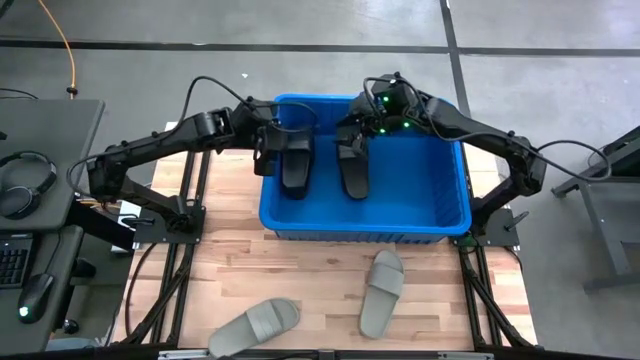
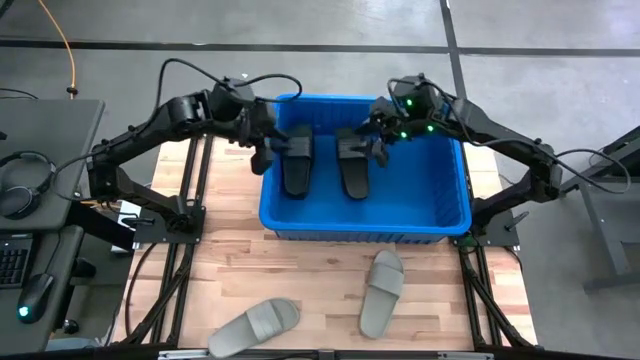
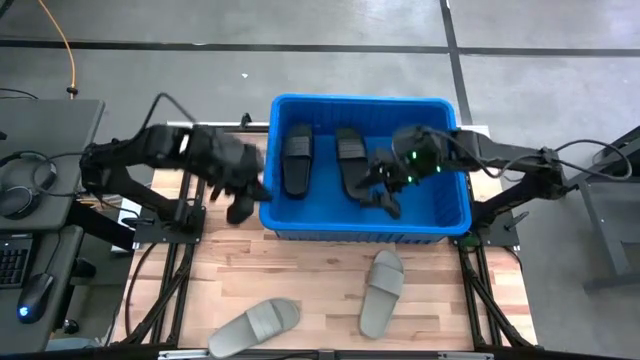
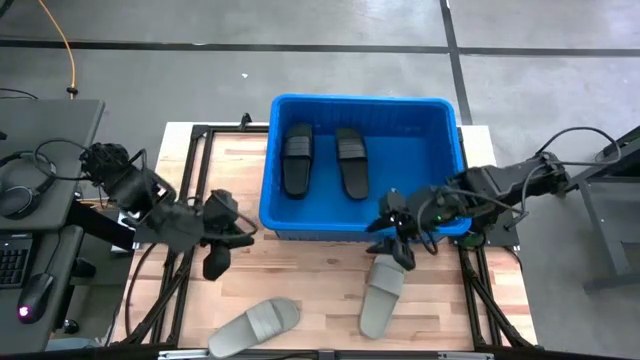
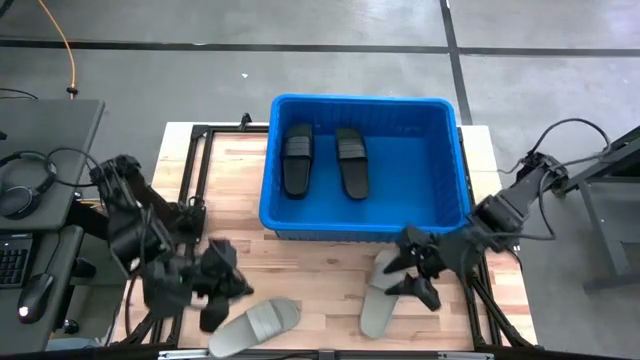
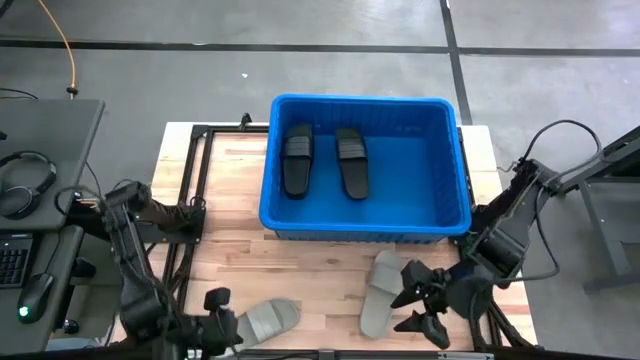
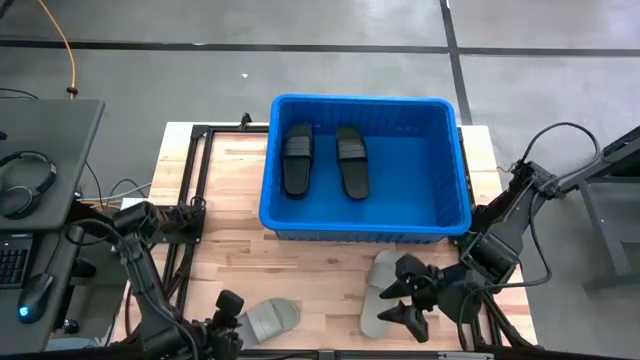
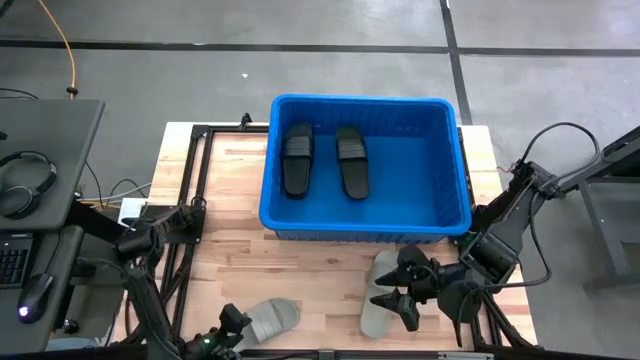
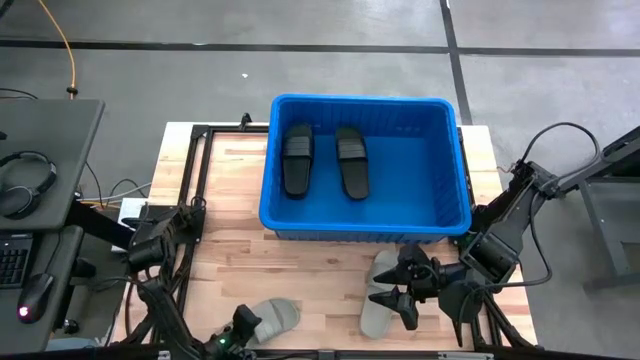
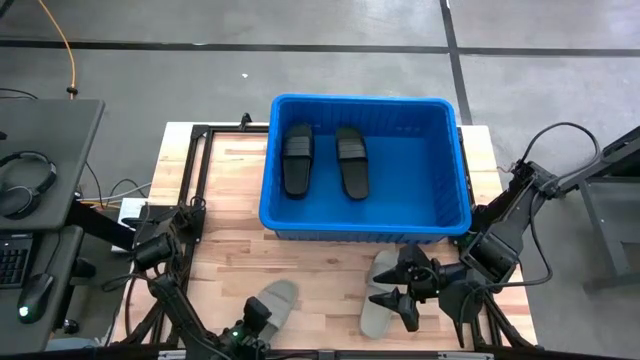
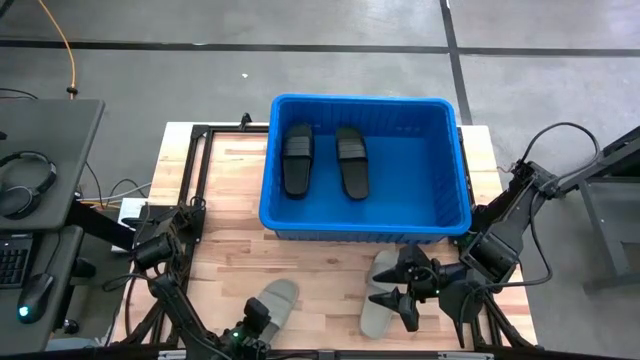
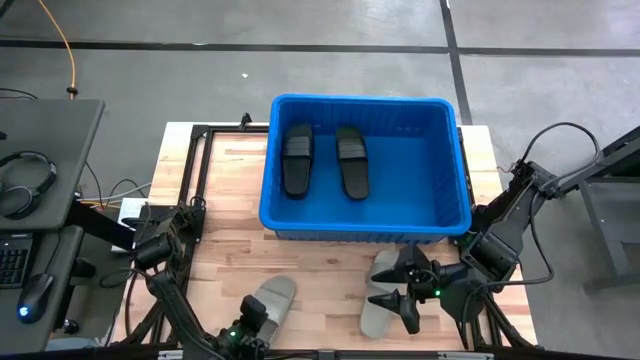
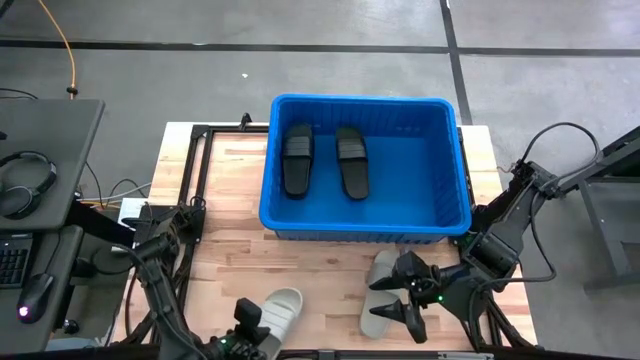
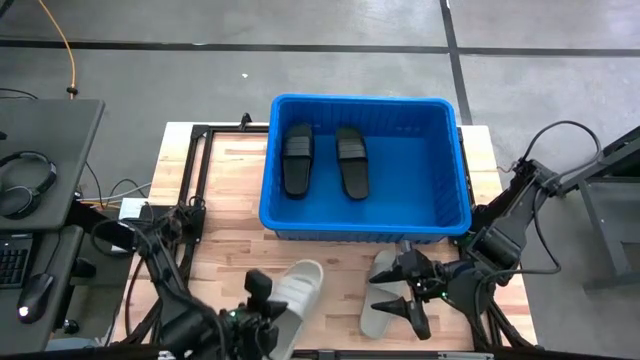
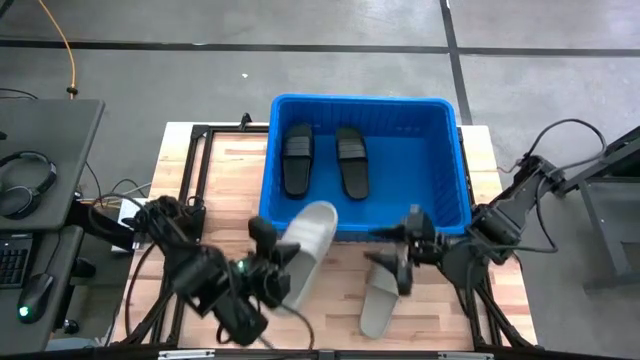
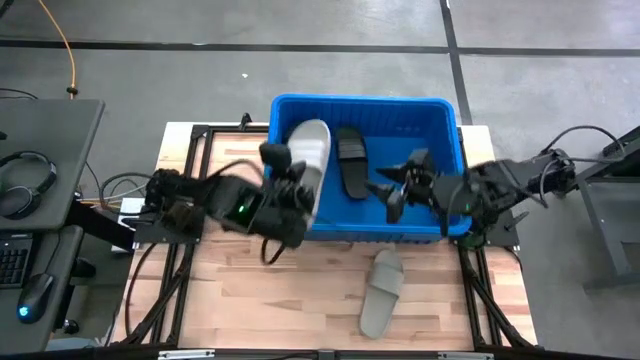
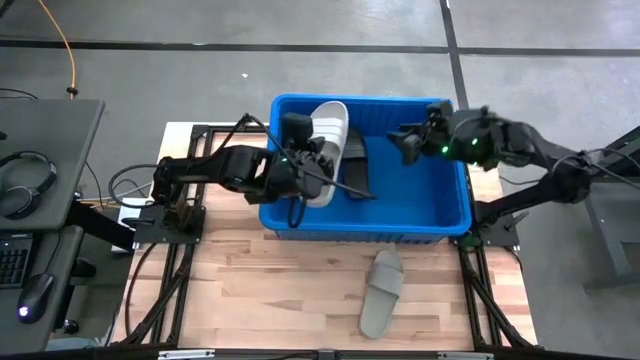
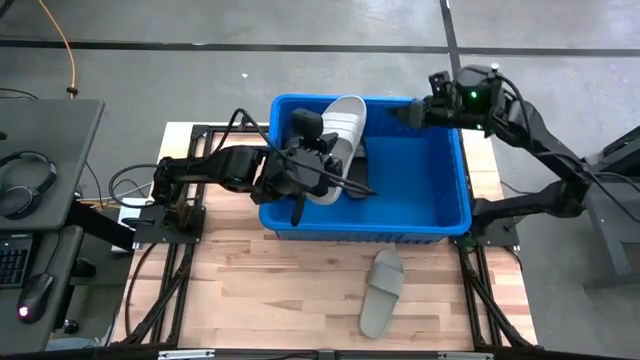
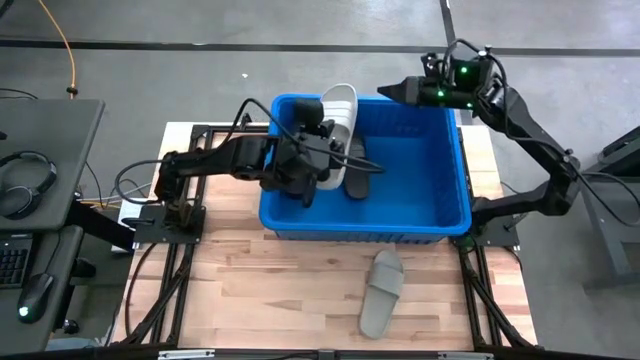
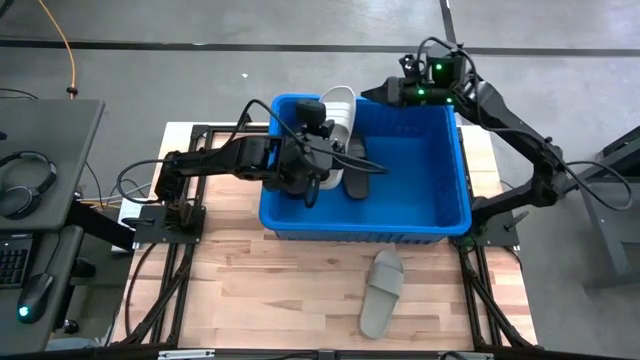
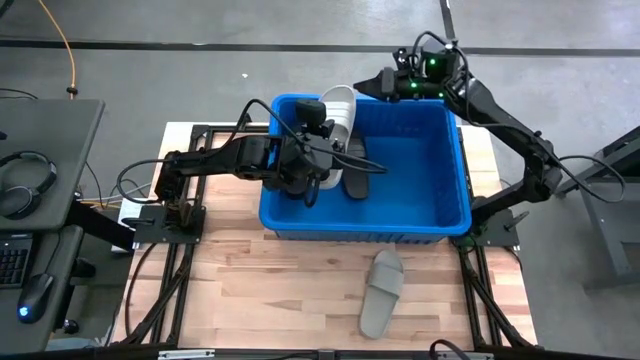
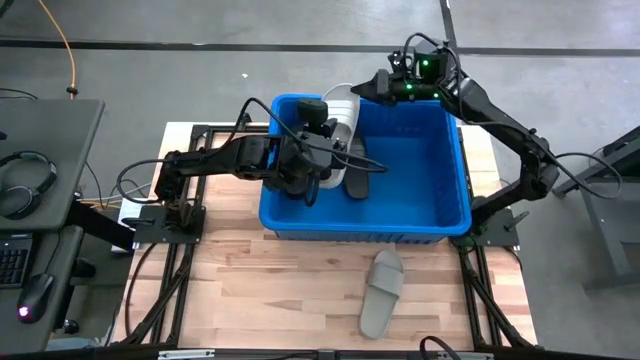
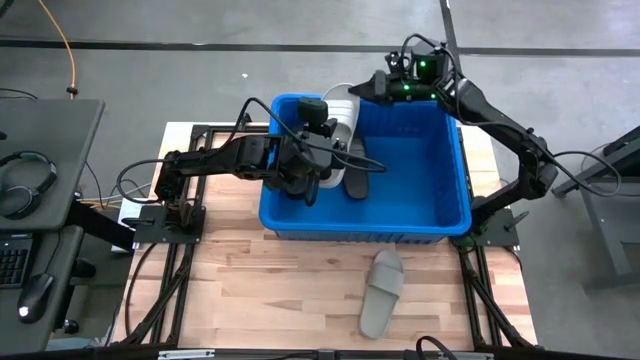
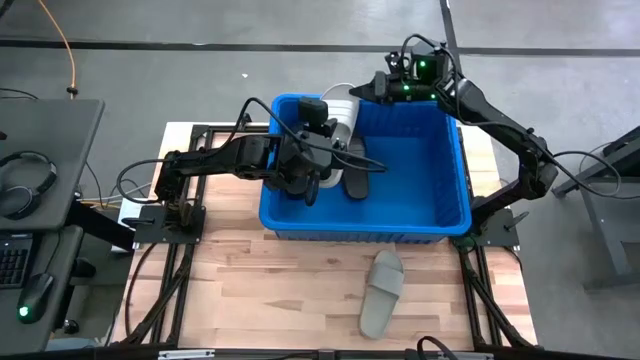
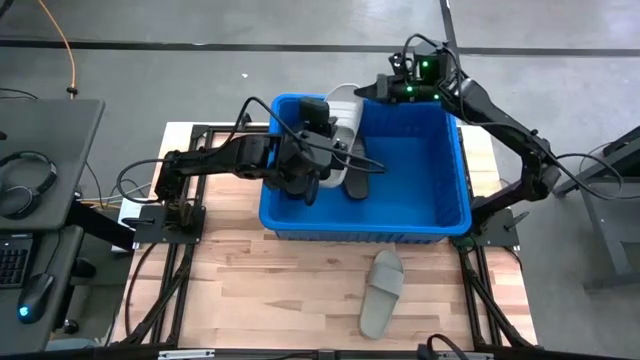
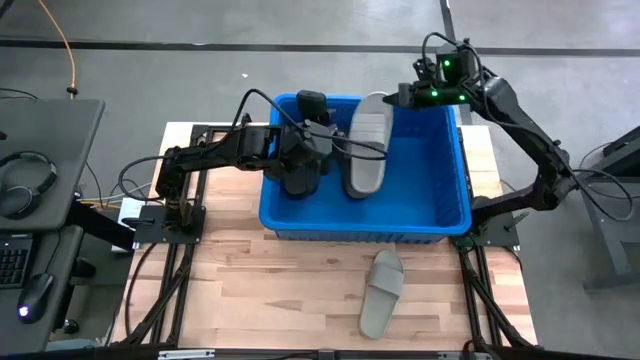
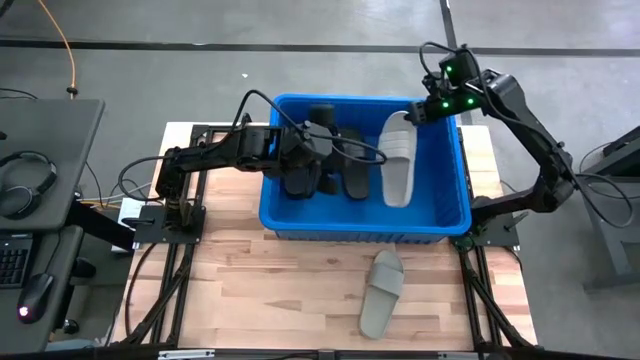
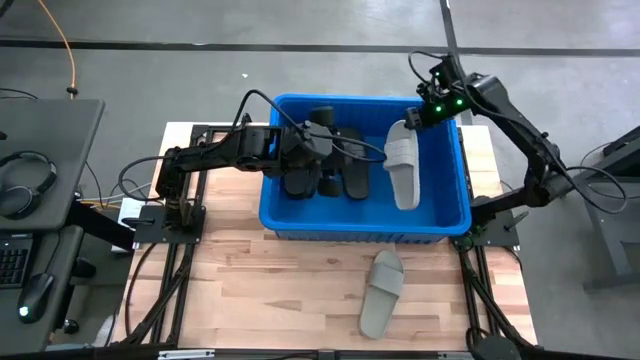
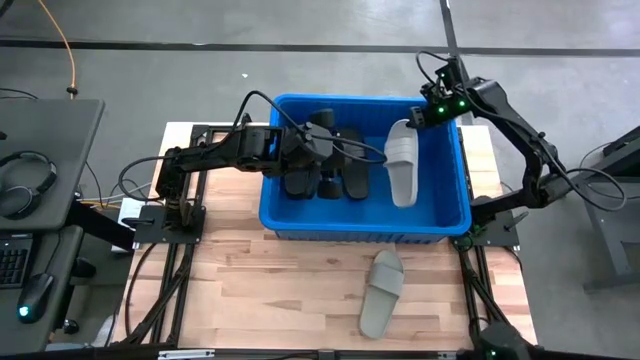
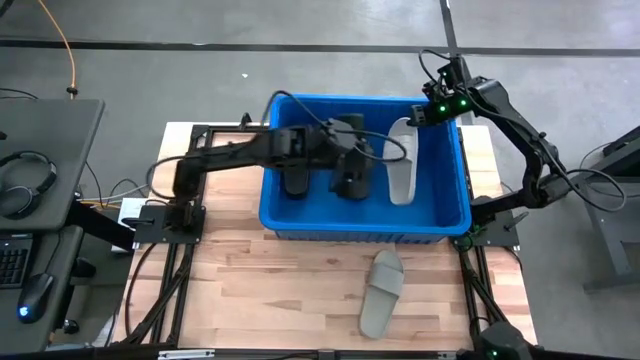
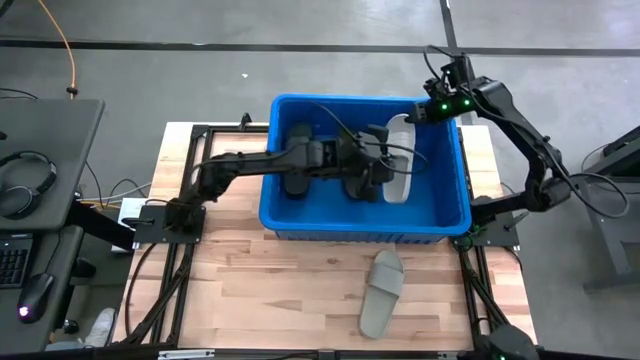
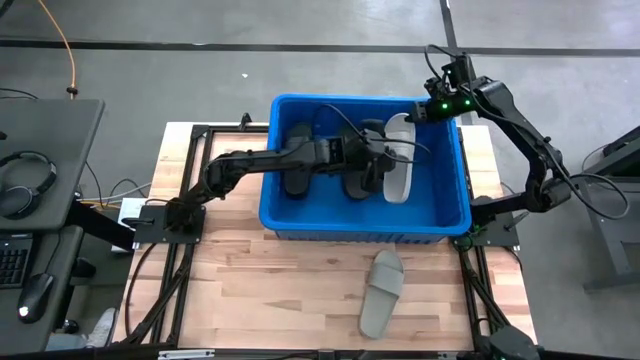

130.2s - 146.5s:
Task: Pick and place slides into bin
Put the gray slides into the blue bin

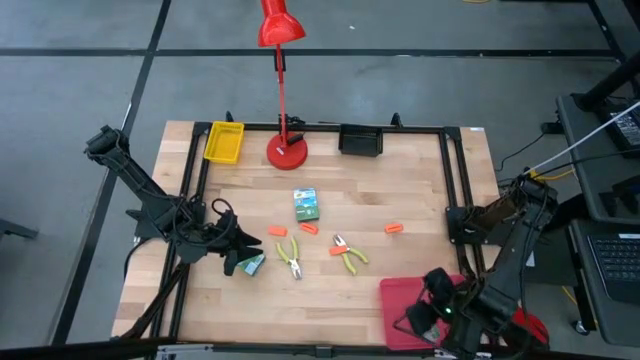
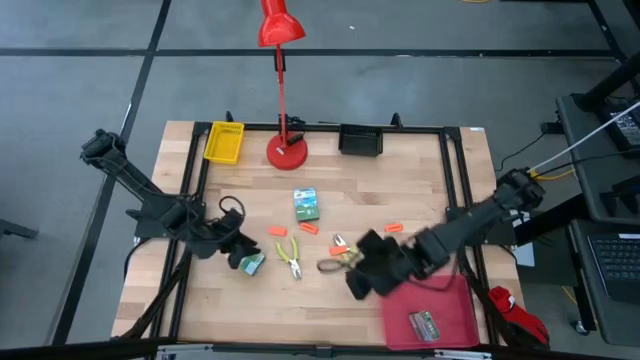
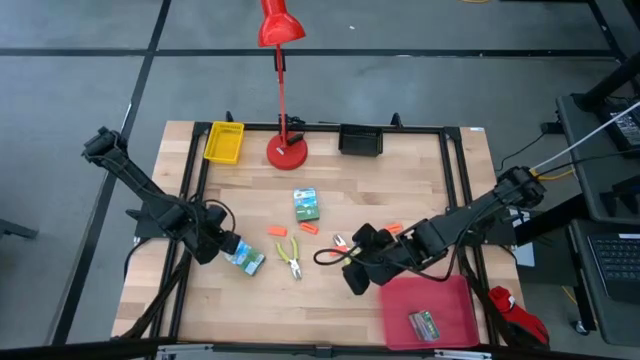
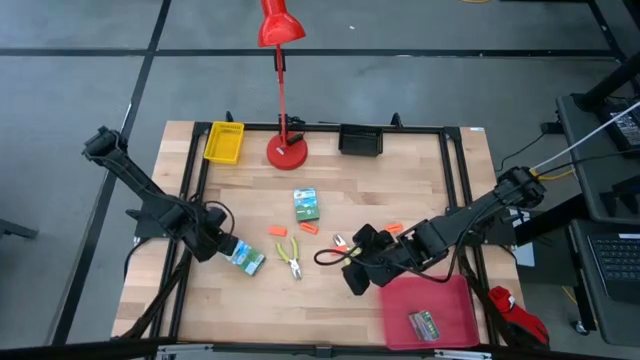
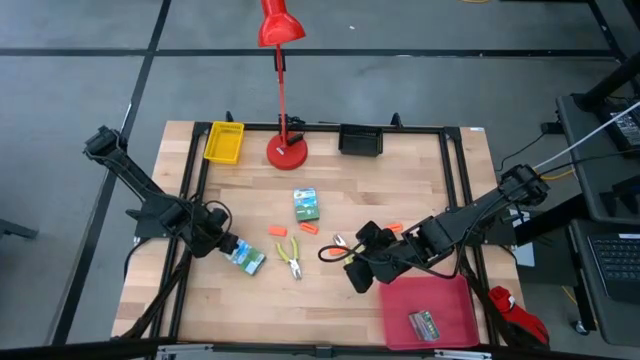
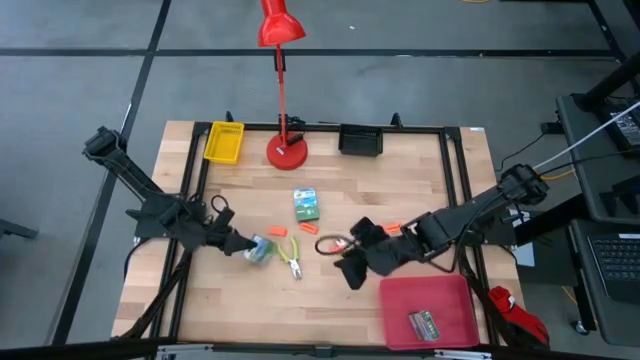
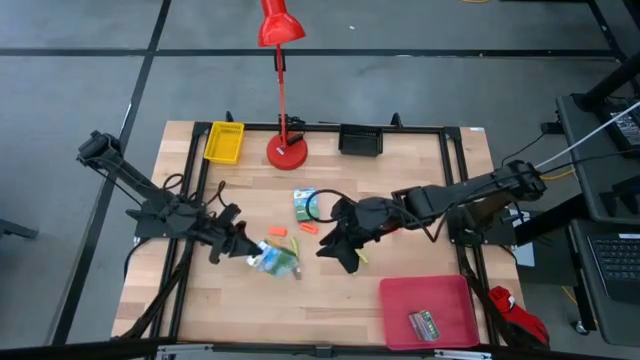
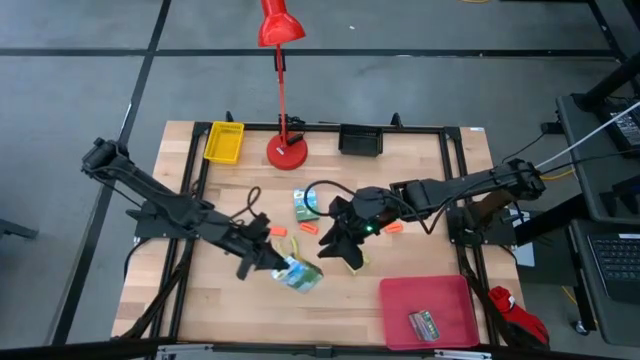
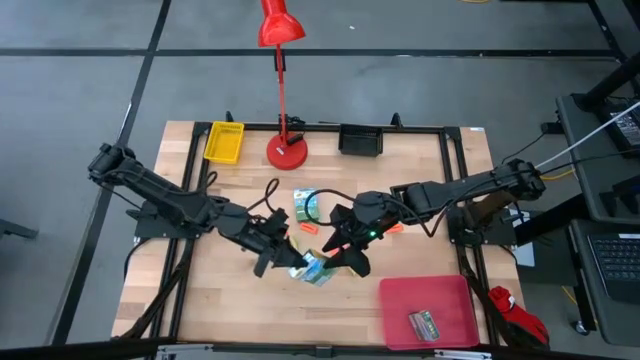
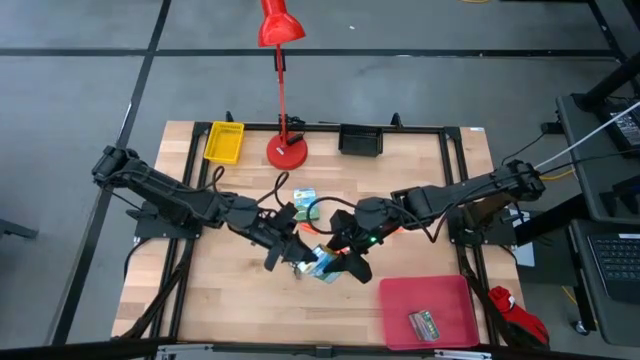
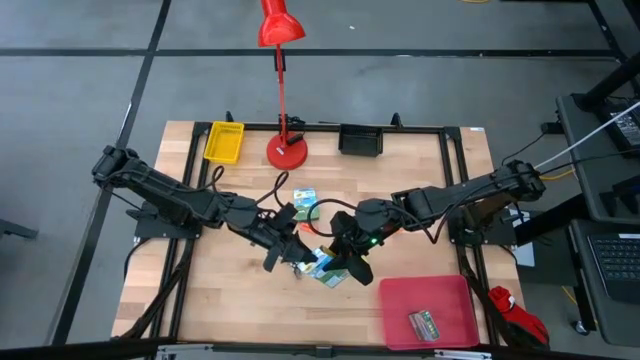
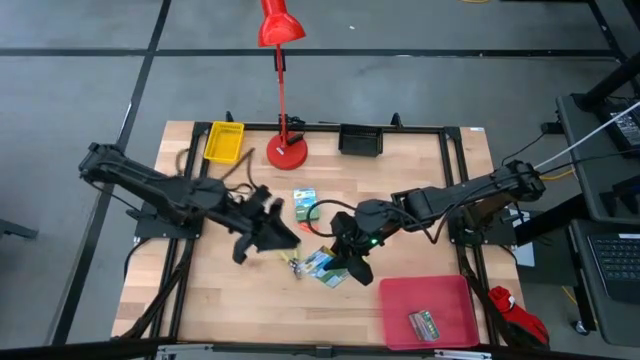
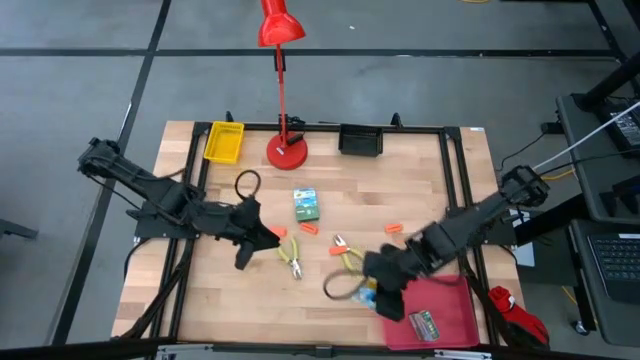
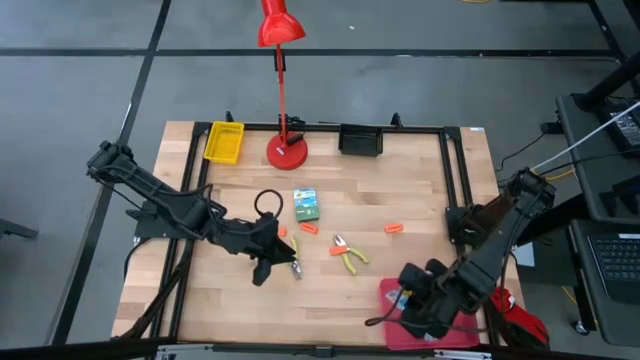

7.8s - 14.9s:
Task: Pick & Place School Supplies
Put the yellow crayon box into the red bin
